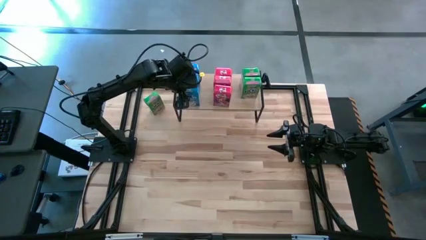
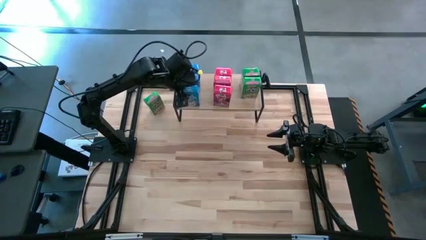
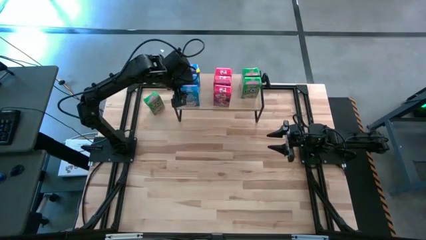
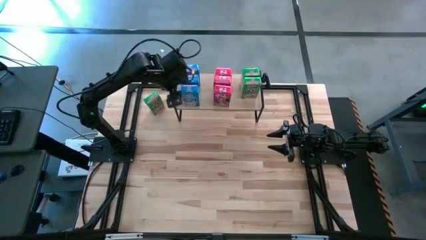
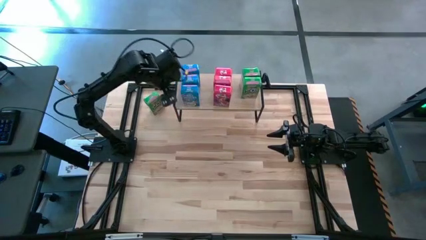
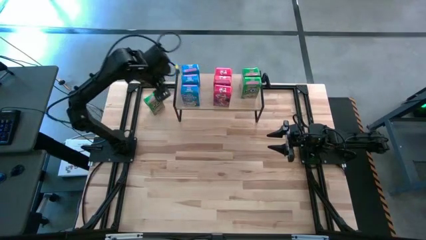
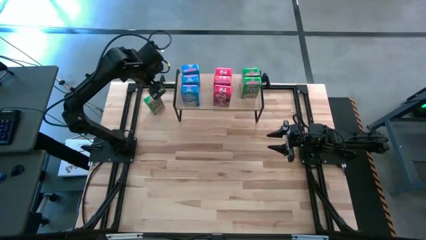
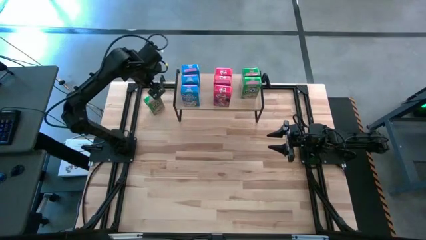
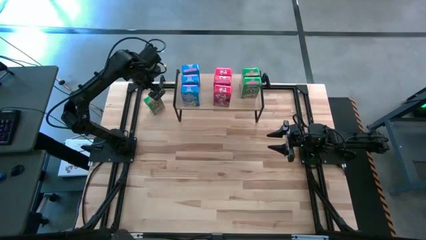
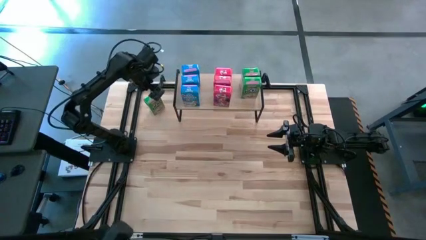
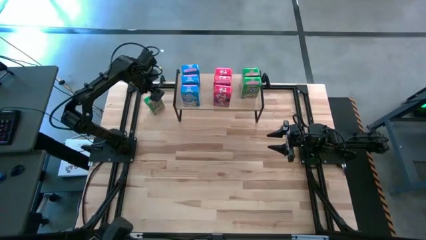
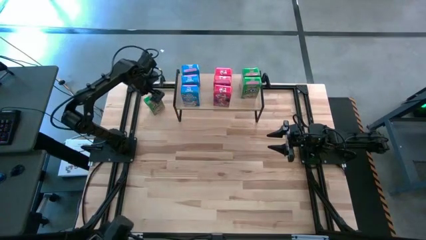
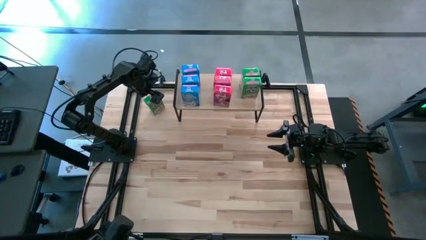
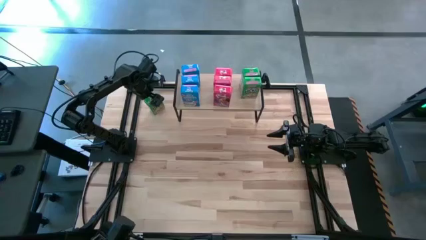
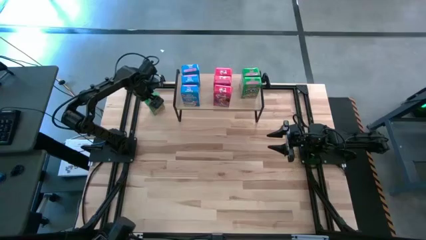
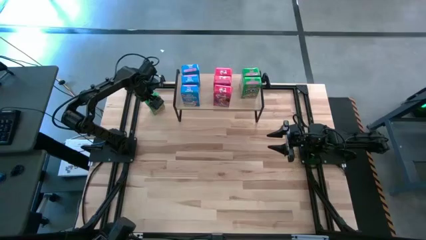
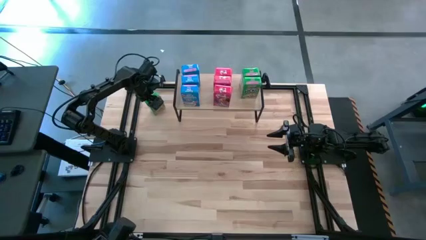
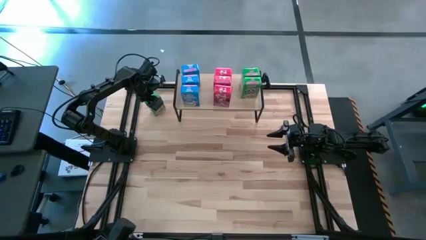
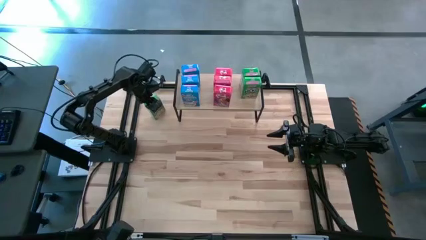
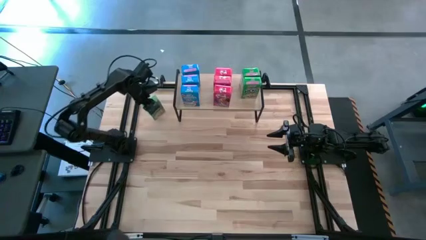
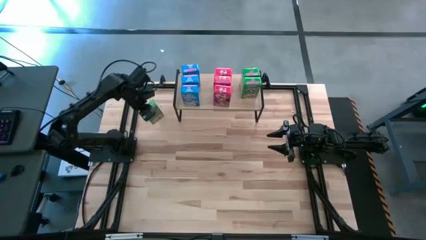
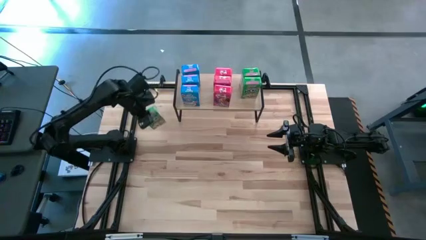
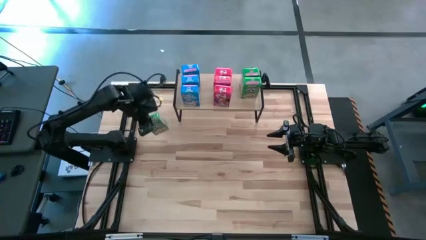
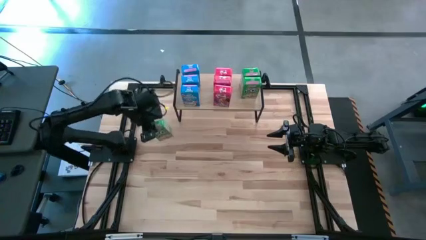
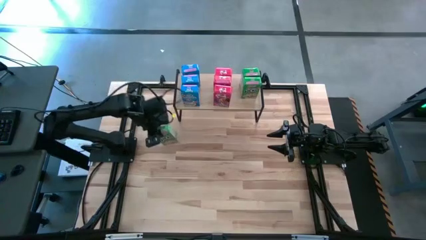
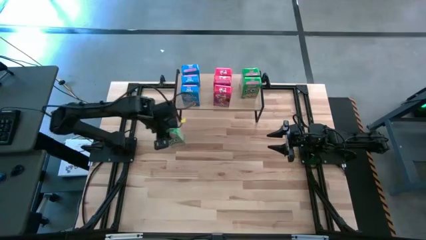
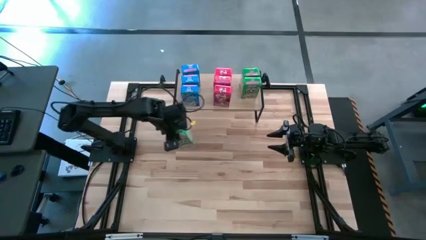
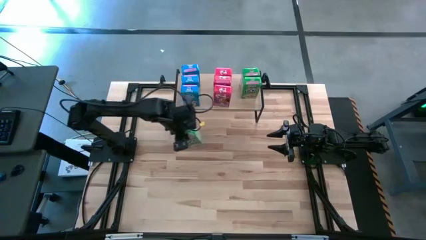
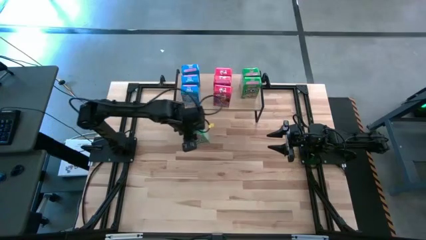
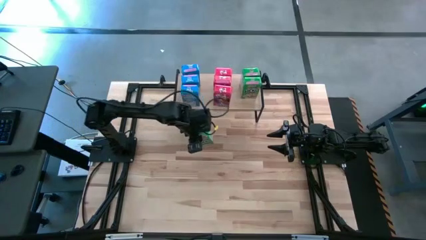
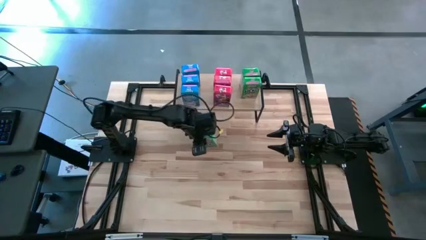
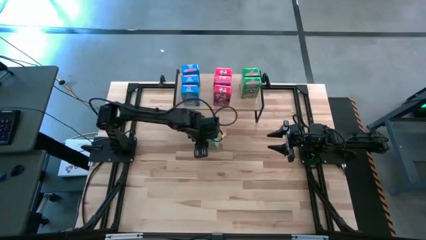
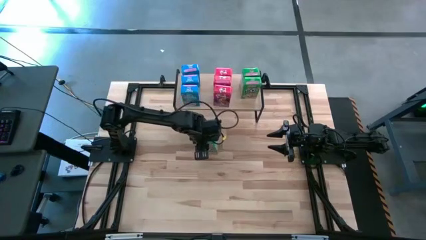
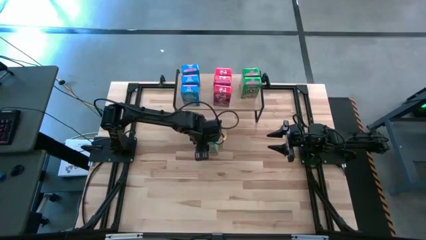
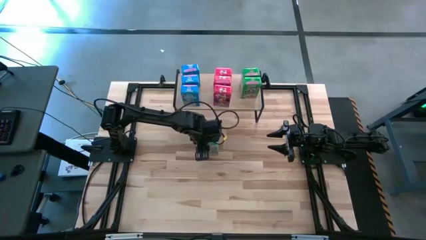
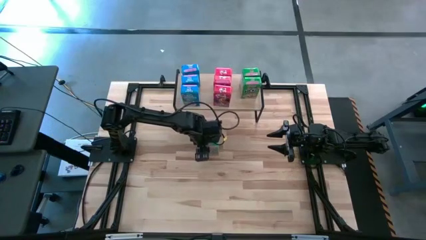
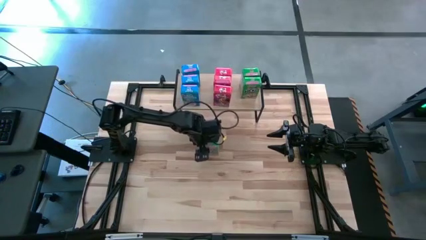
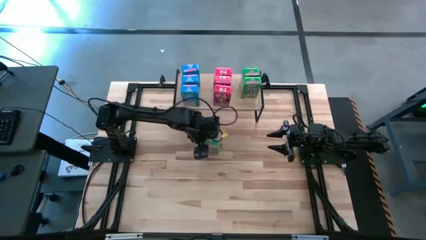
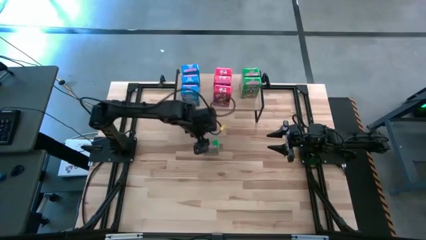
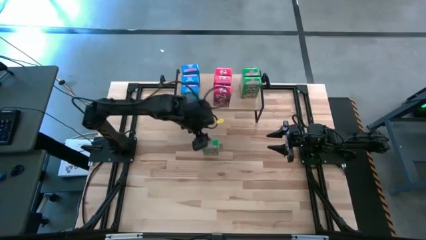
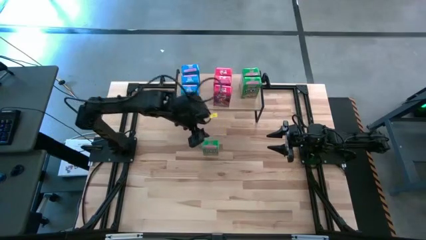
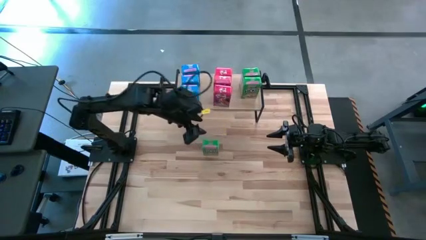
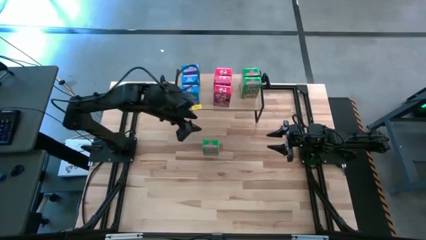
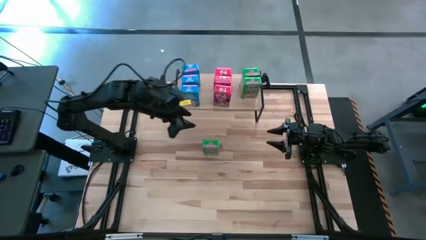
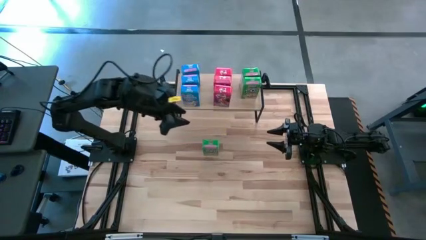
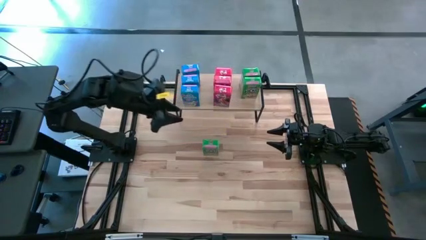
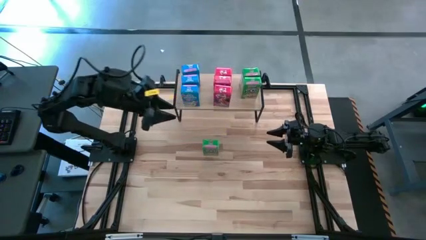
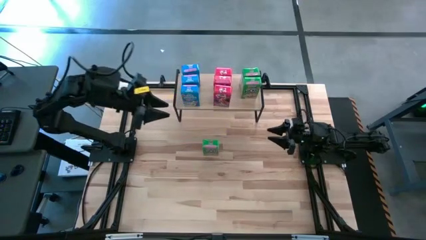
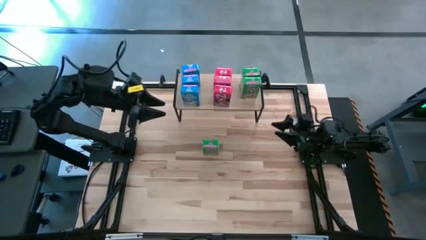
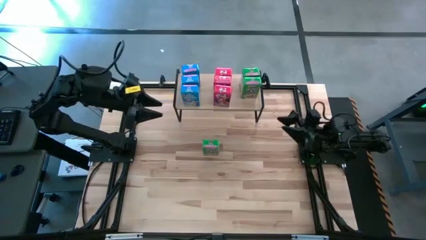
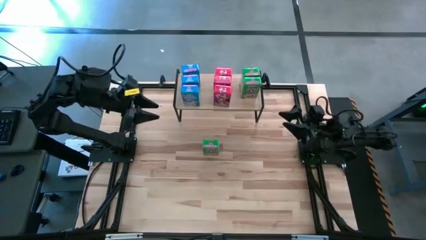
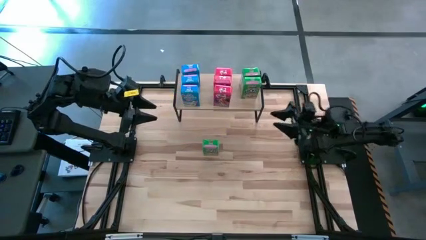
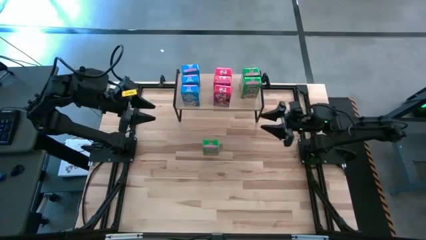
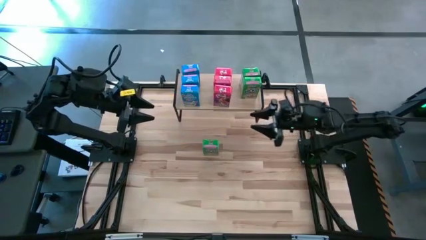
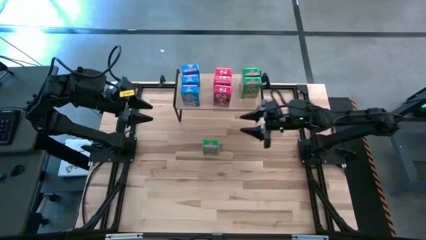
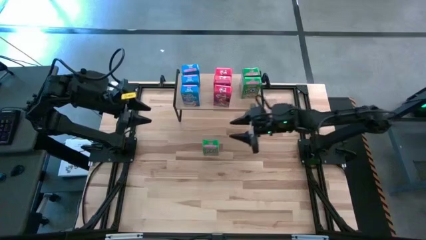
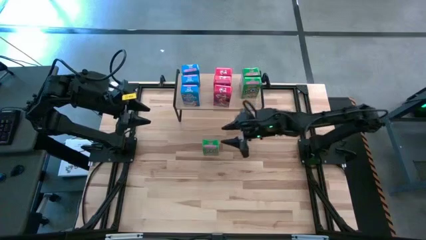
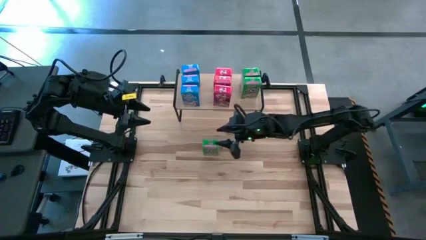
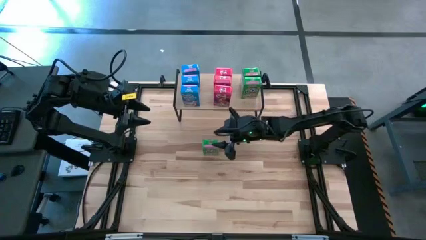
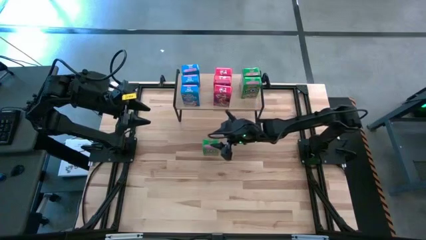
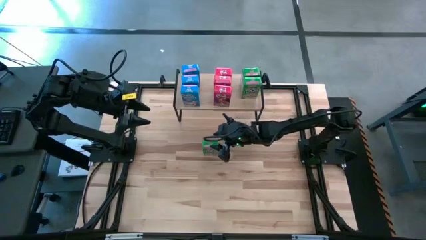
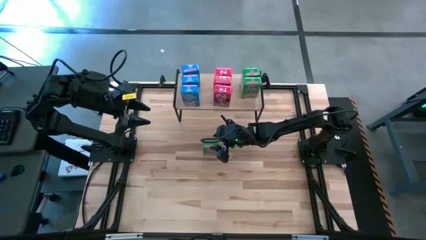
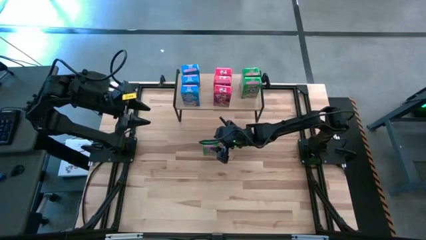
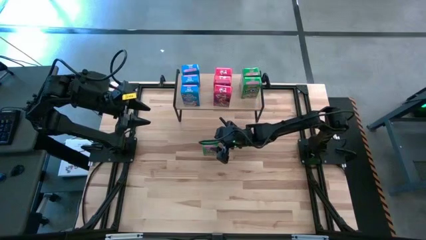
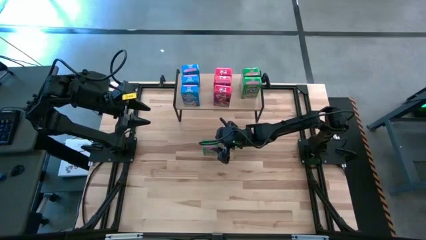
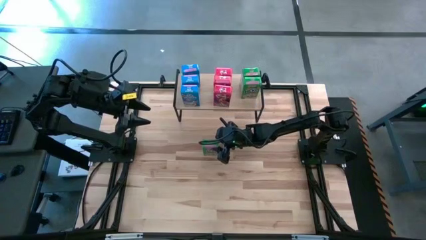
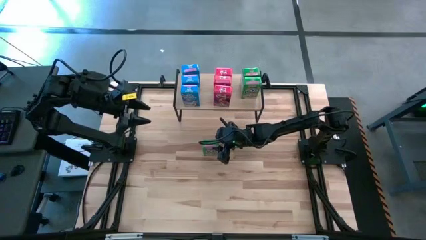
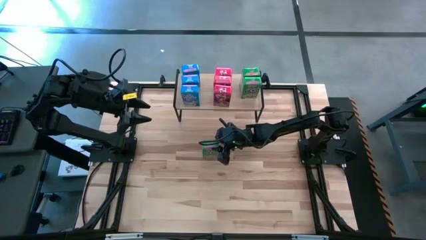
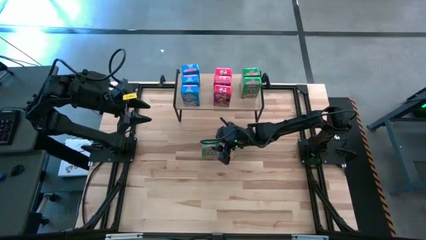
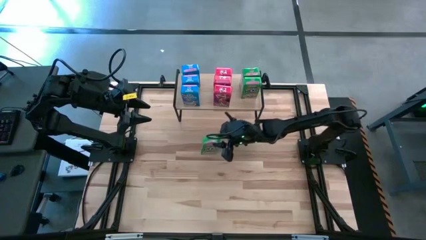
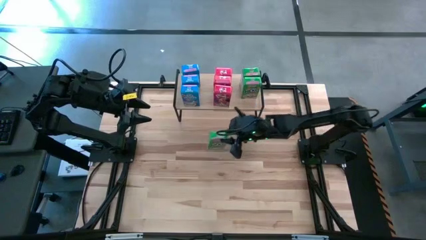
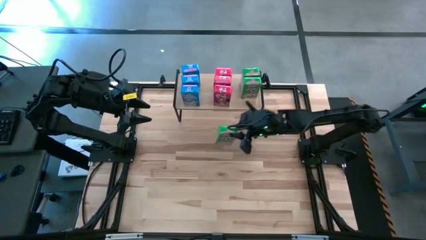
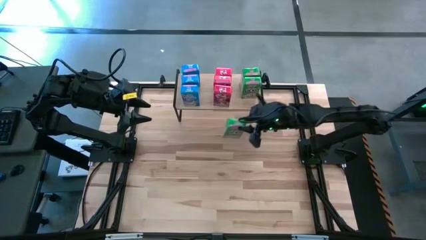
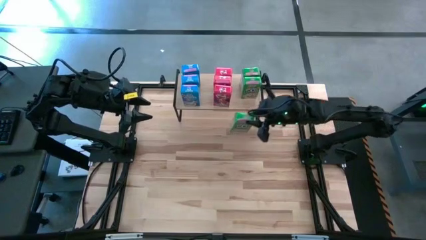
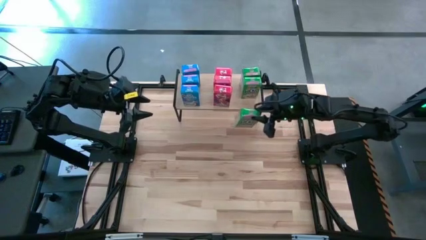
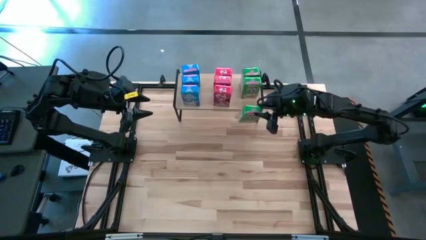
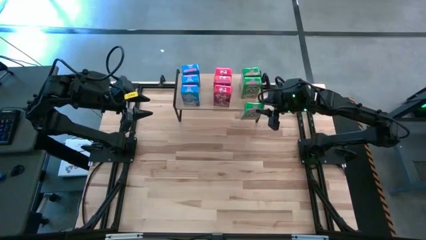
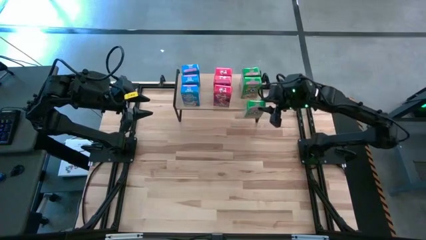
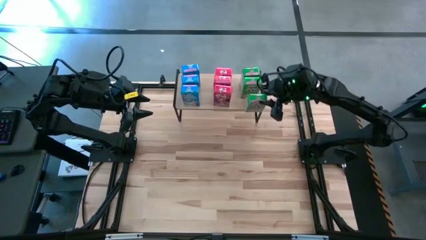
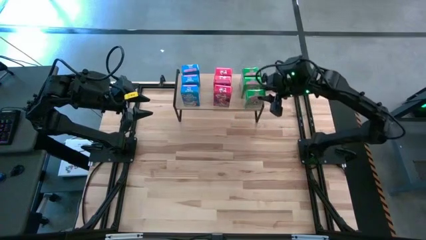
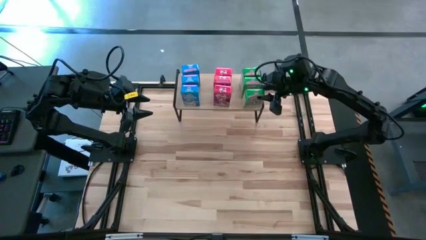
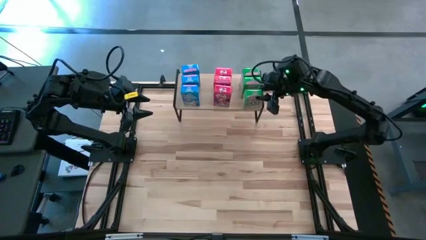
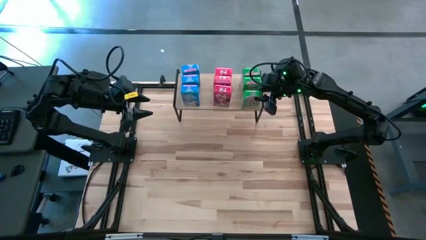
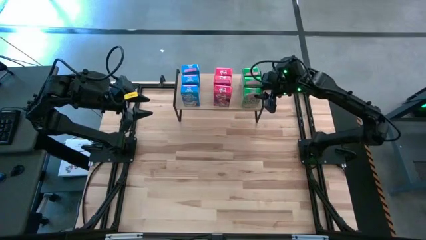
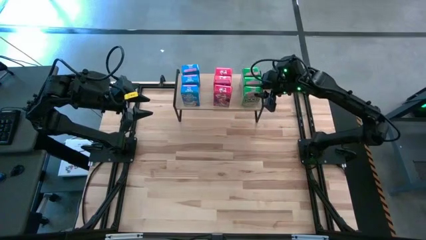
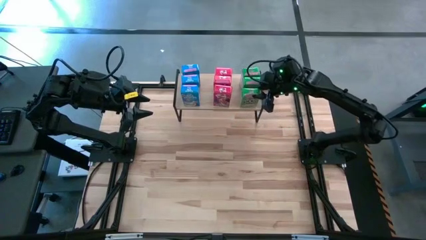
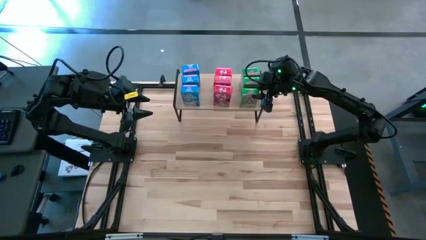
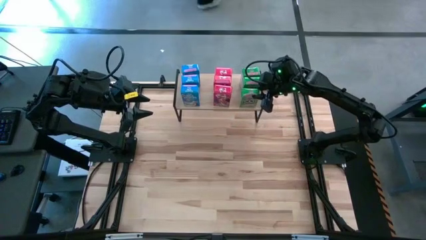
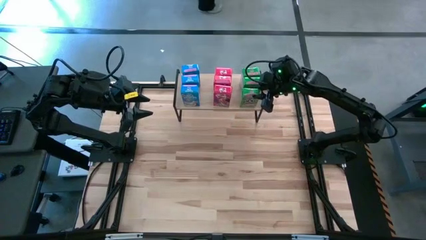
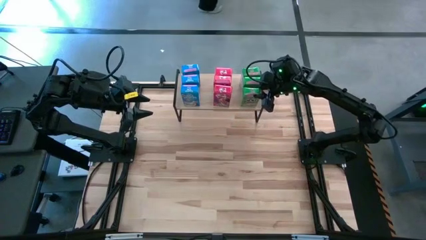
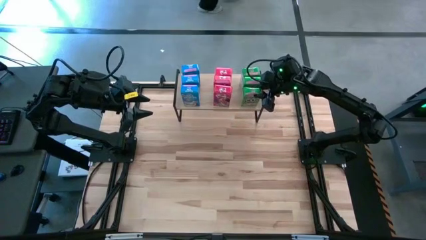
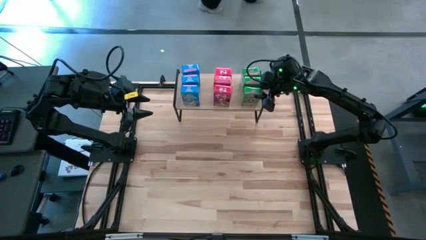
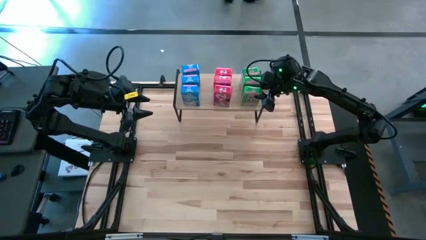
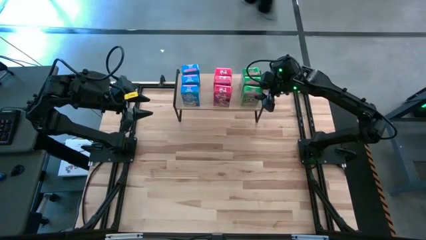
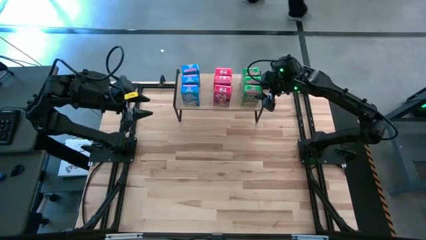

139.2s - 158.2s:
Task: Stack cereal on shelf
Put the green cereal box on the shelf aligned with the other green cereal boxes
